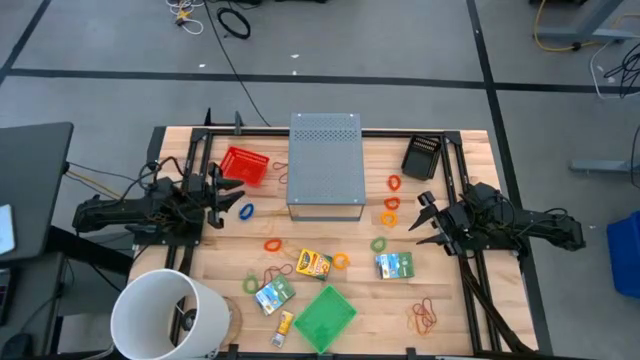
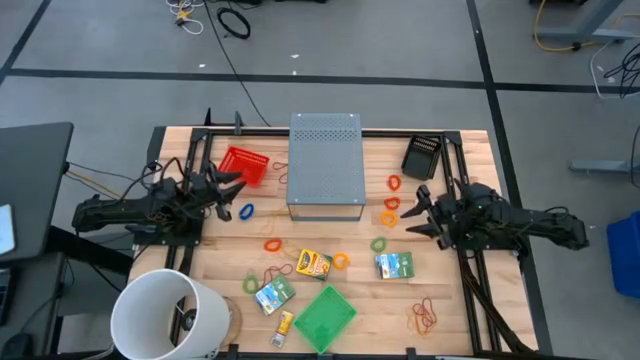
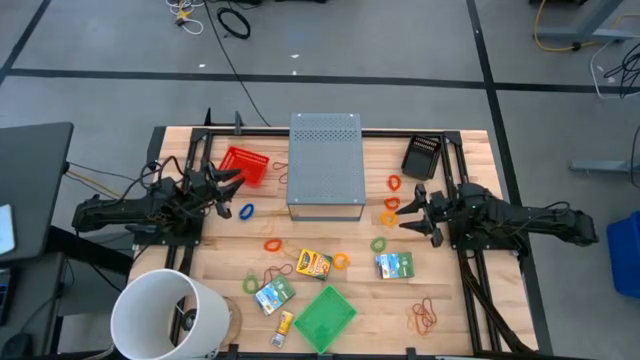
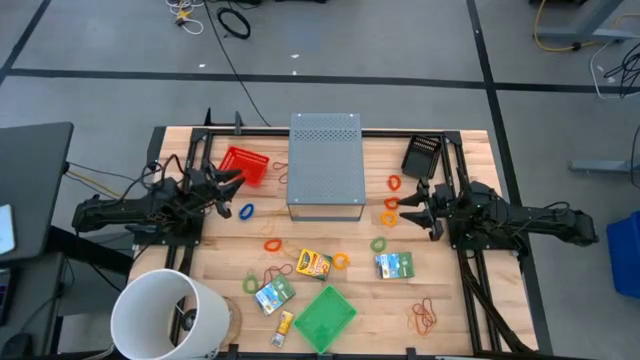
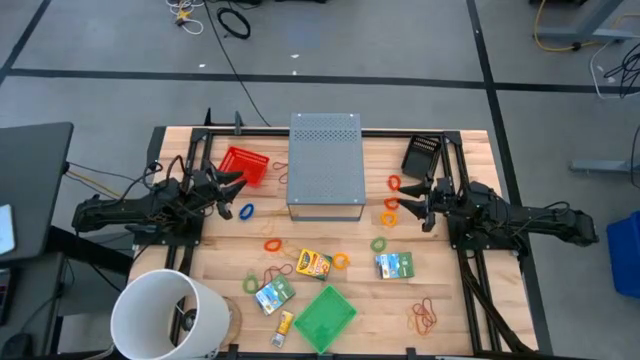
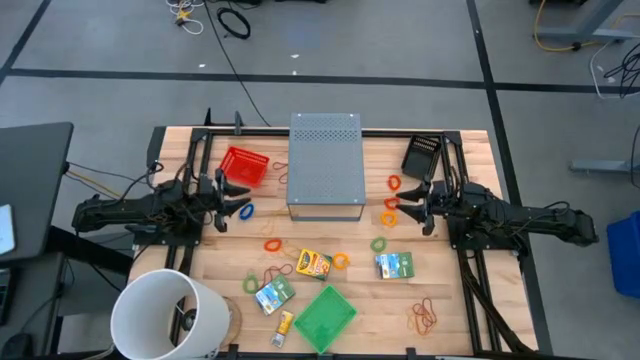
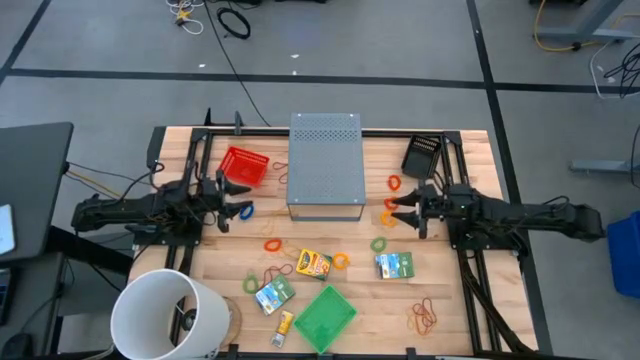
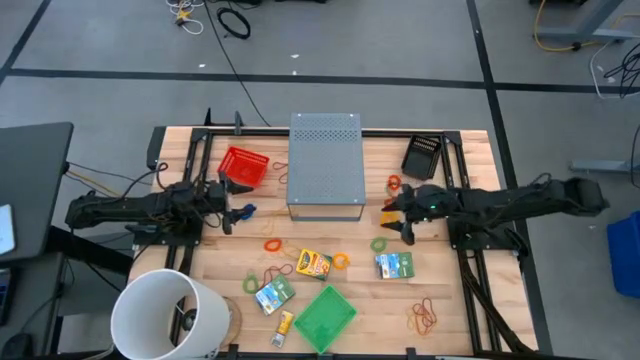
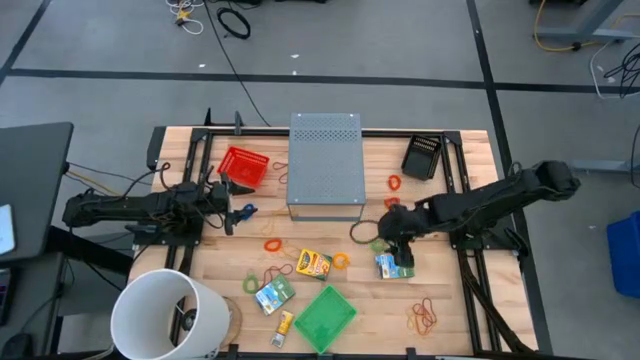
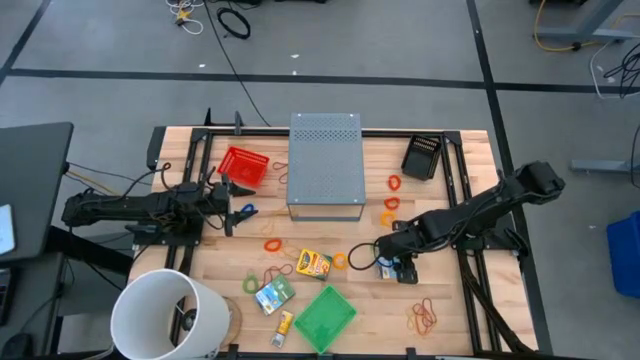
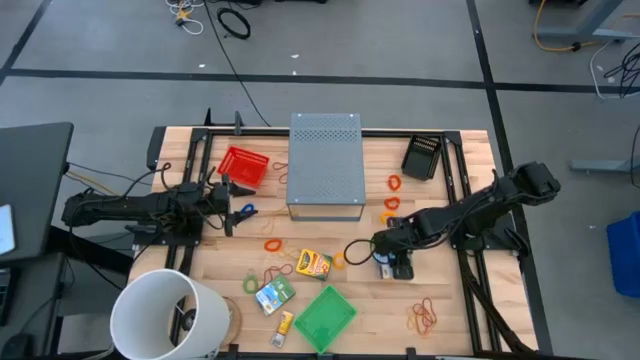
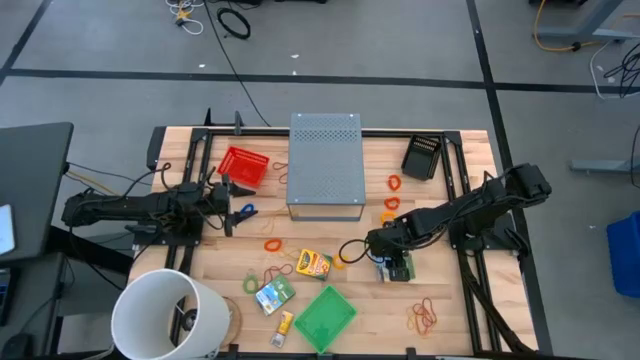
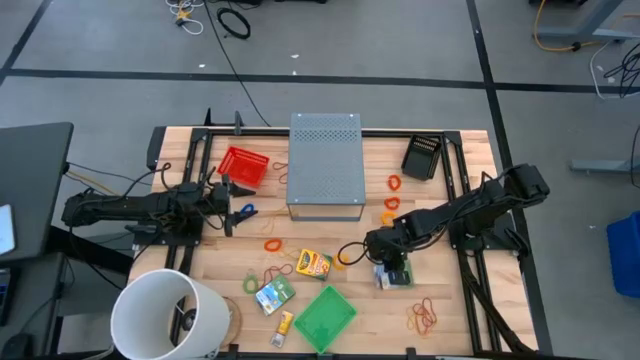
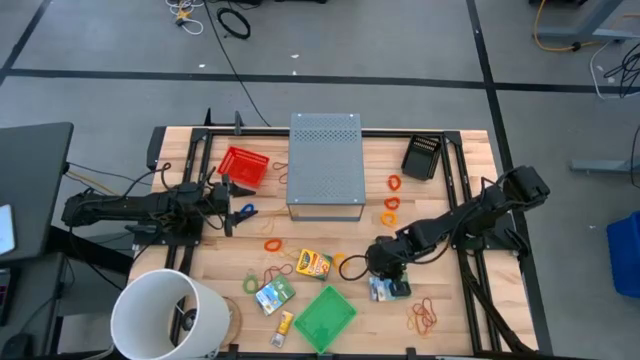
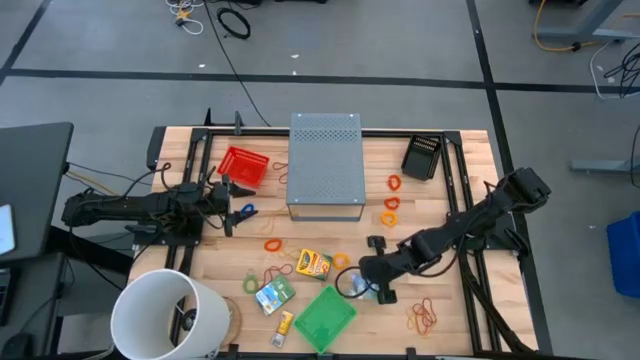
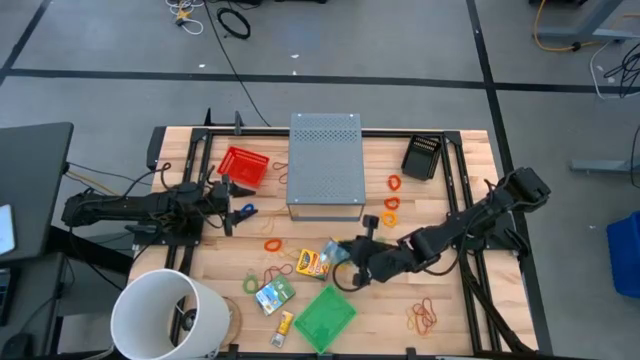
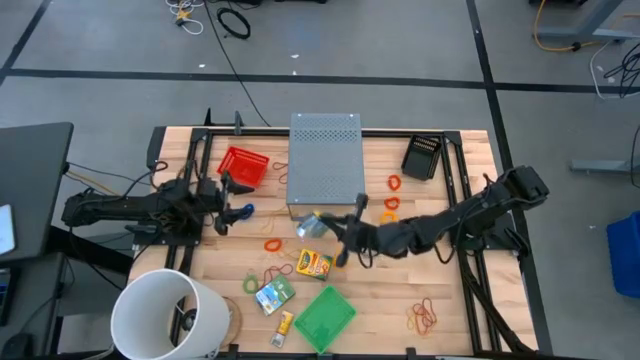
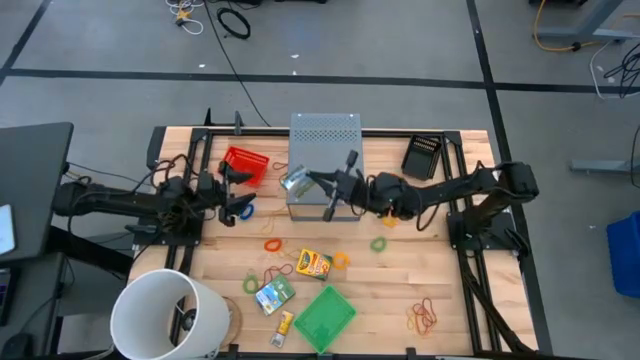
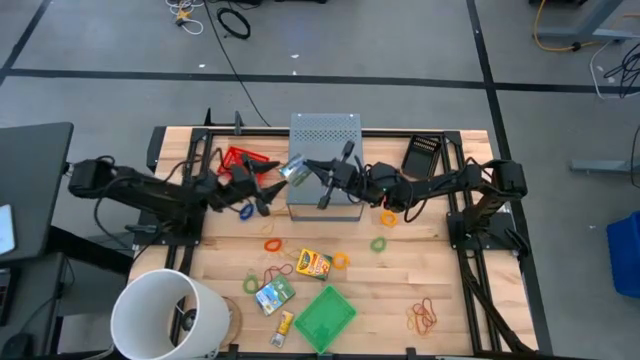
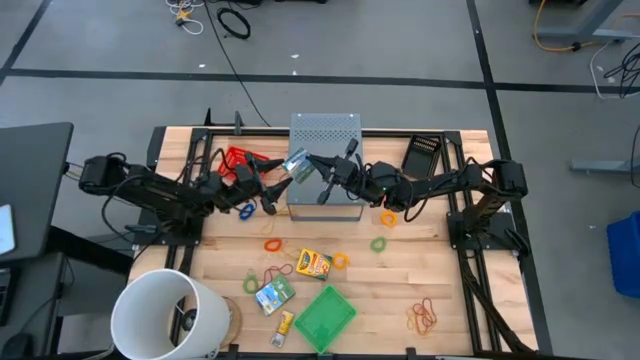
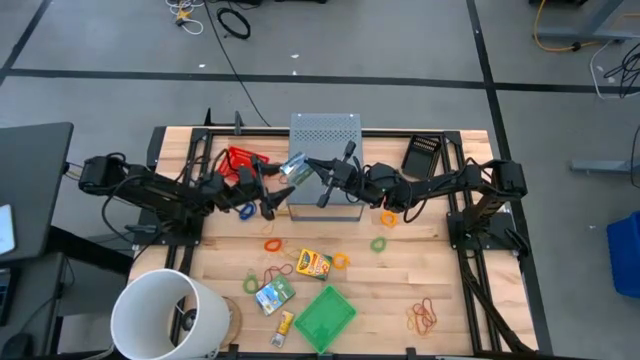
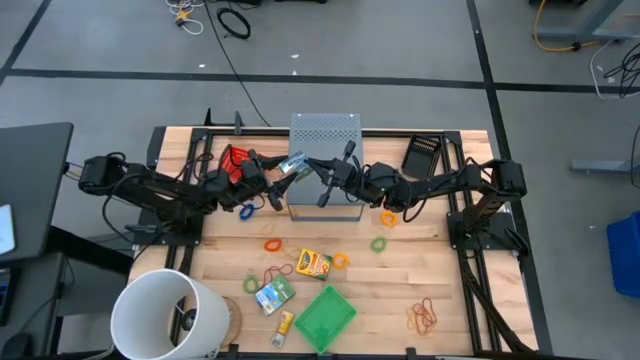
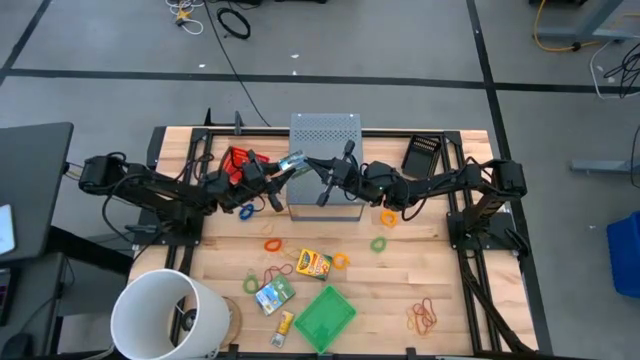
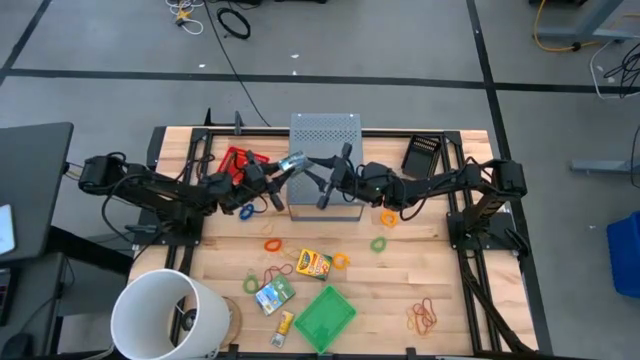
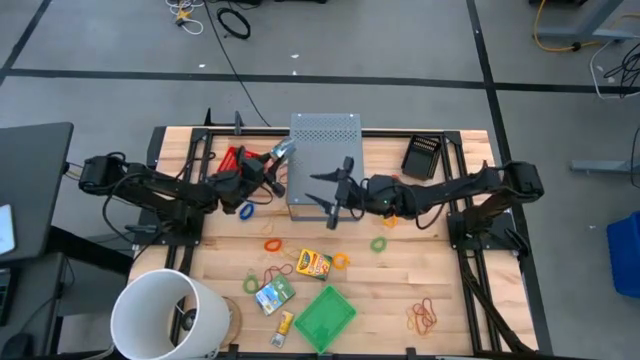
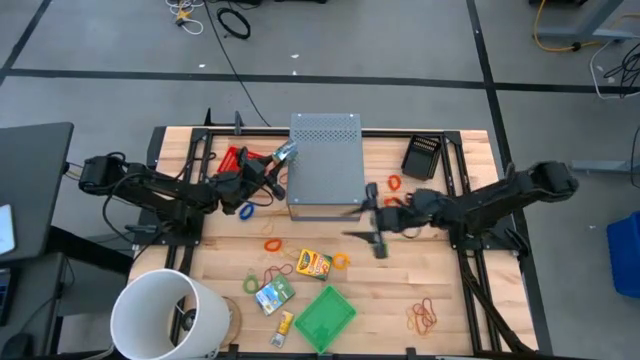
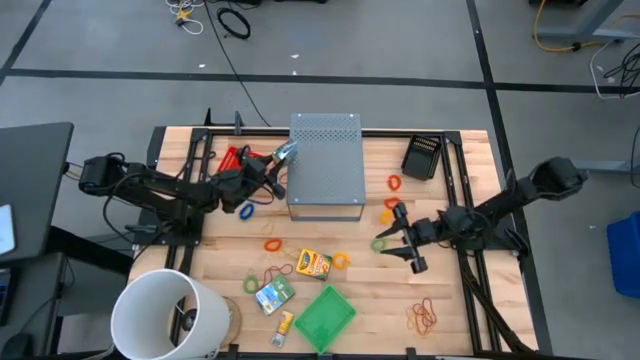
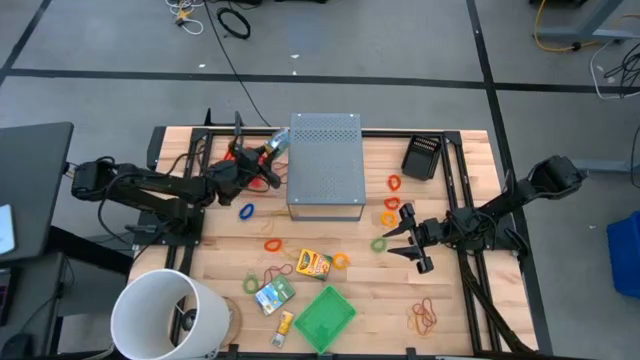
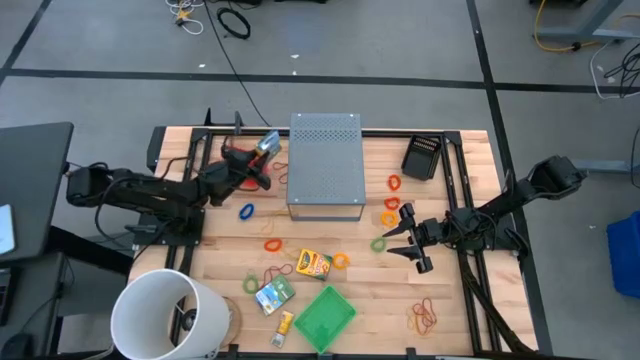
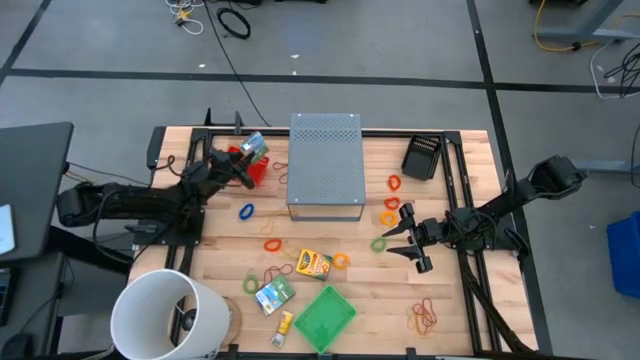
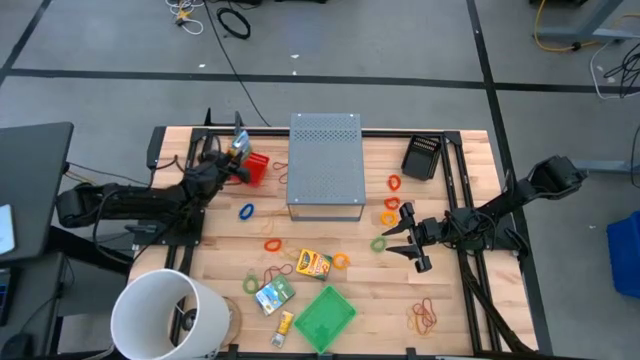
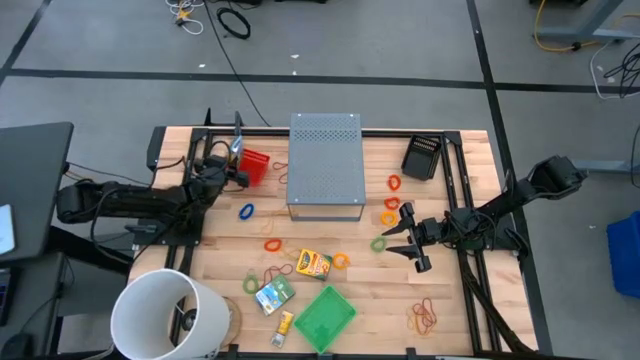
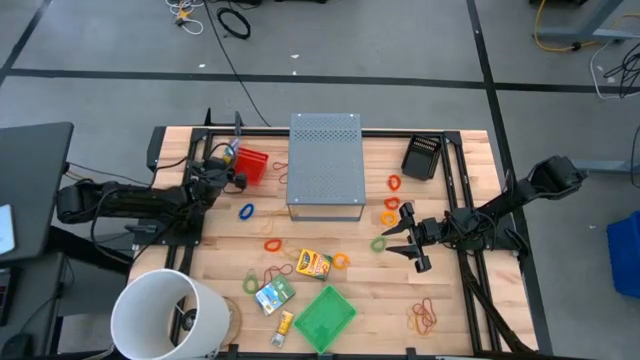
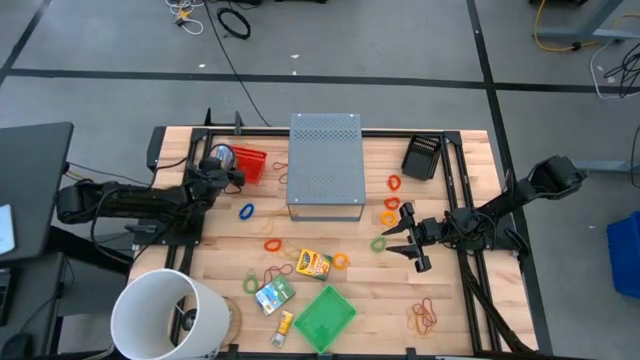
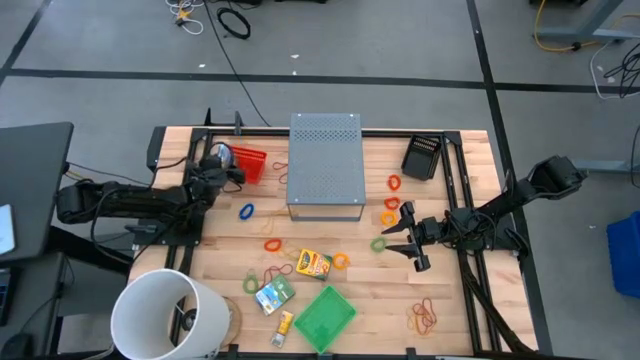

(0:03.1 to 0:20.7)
Task: Pick & Place Office Desk Supplies
Put the yellow crayon box into the red basket

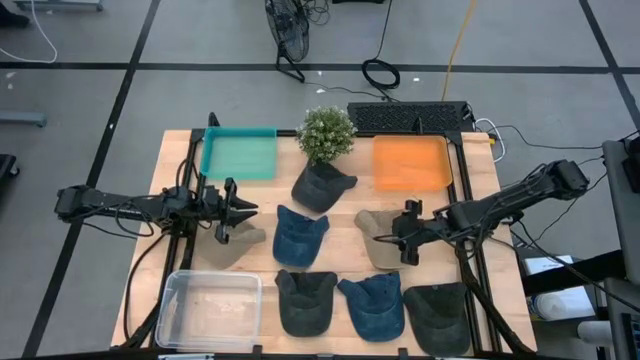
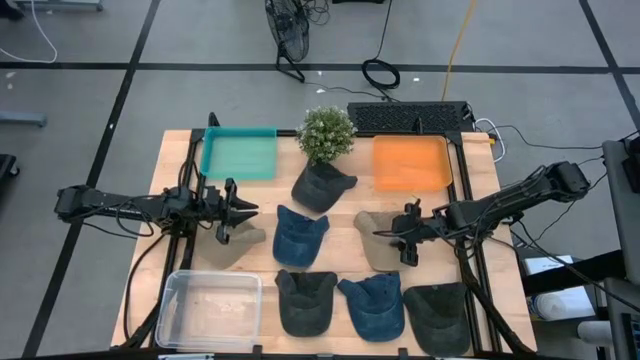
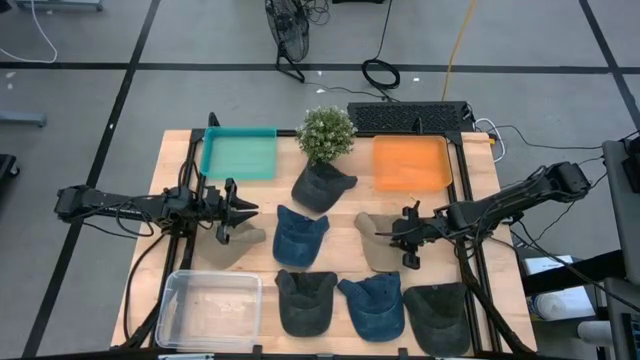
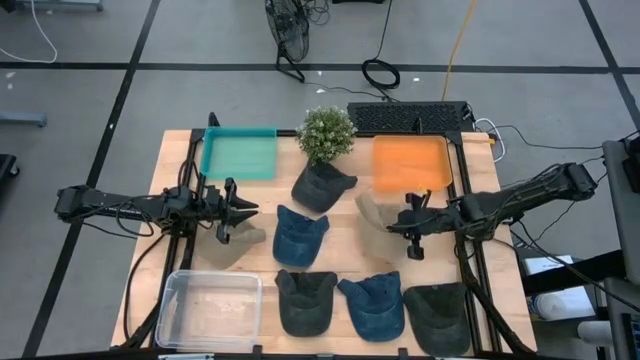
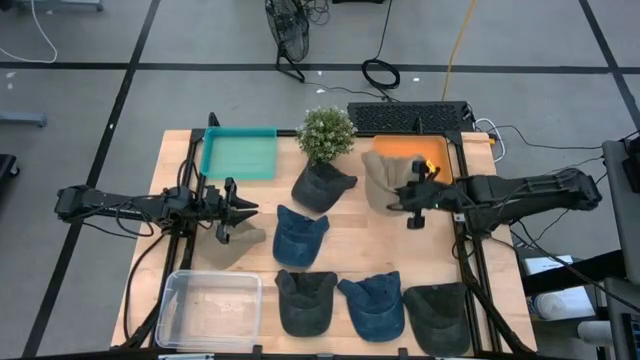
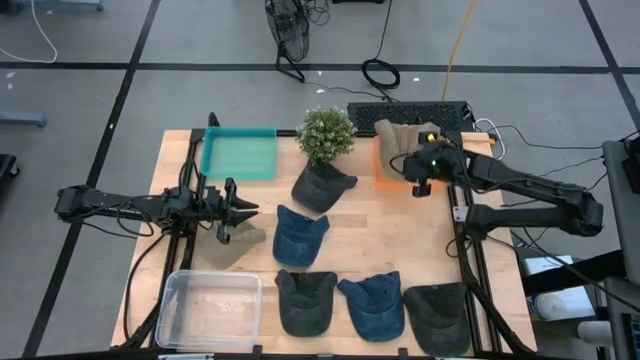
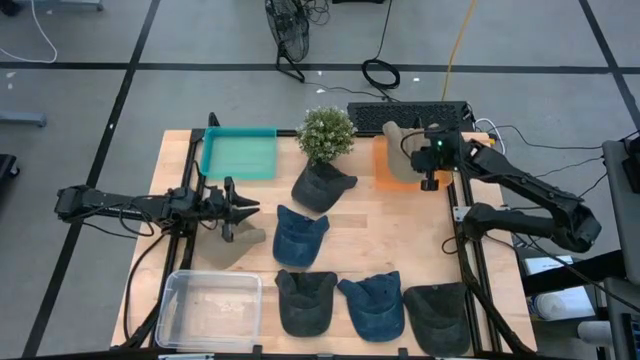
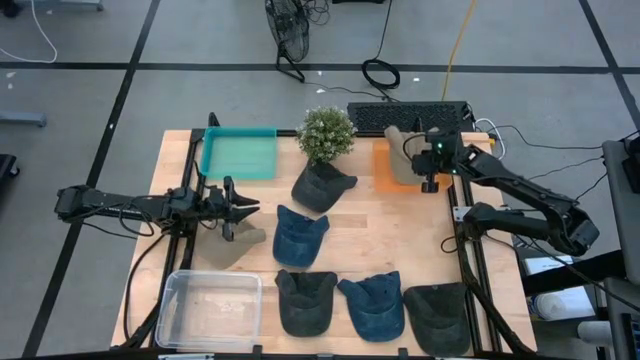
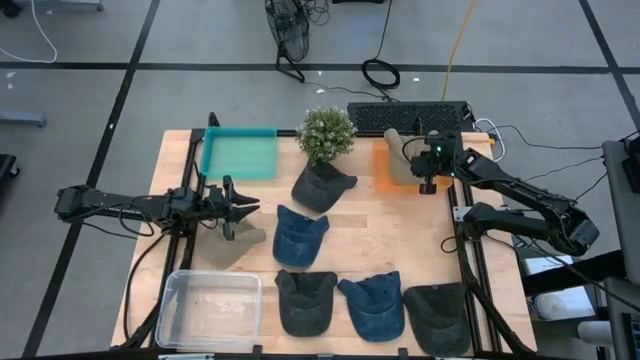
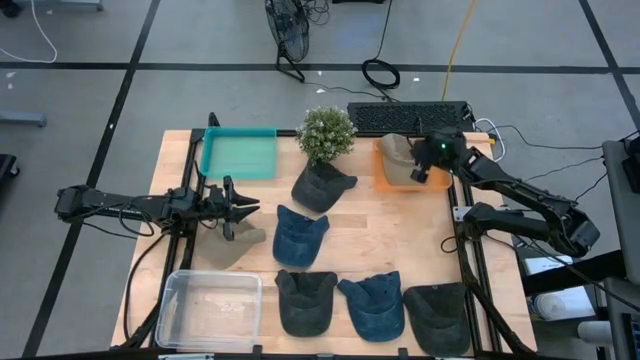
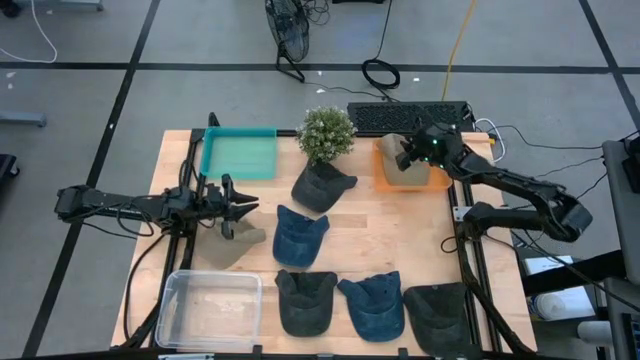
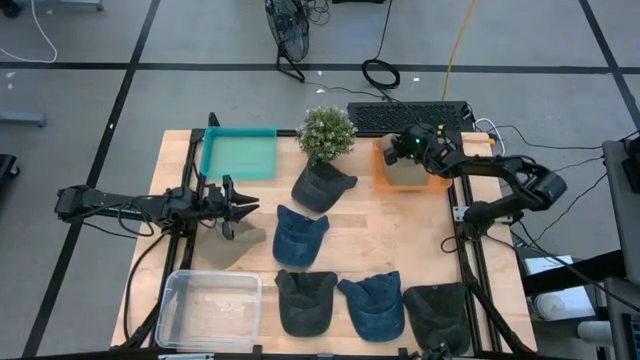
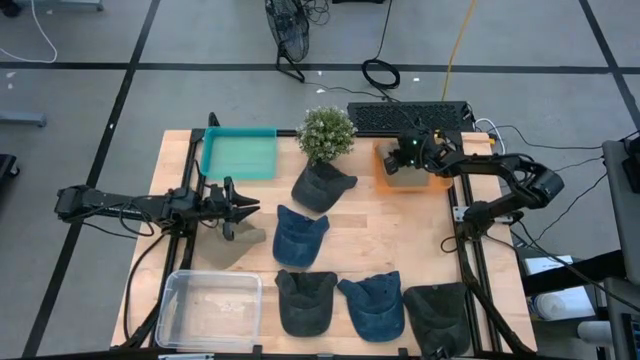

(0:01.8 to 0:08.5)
Task: Pick & Place hat
Put the right brown cap into the orange bin
